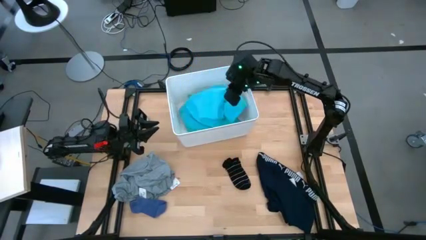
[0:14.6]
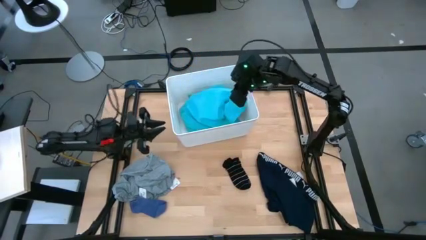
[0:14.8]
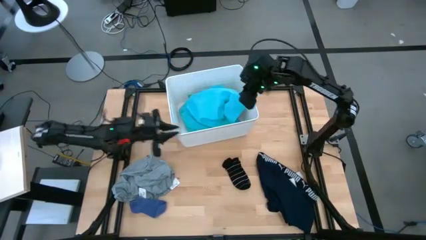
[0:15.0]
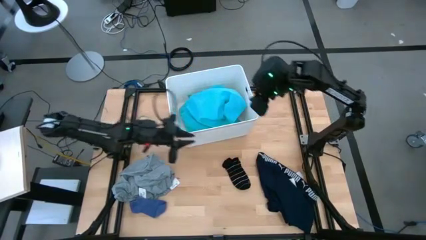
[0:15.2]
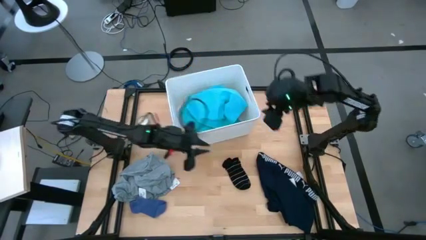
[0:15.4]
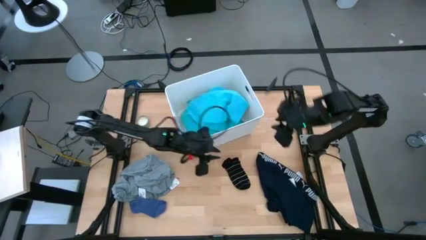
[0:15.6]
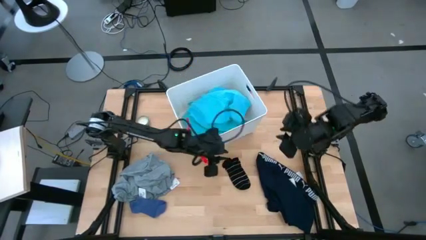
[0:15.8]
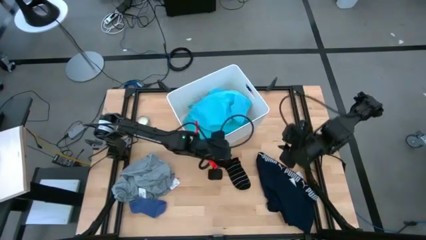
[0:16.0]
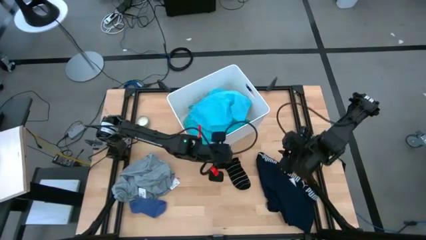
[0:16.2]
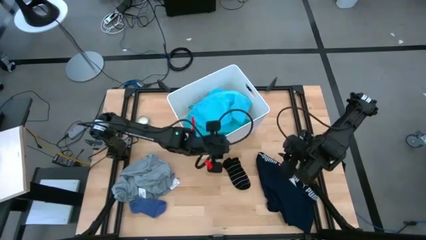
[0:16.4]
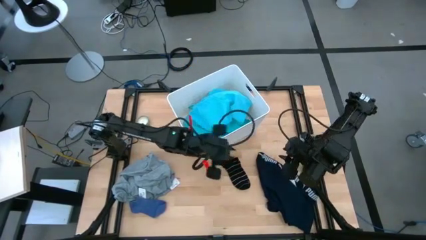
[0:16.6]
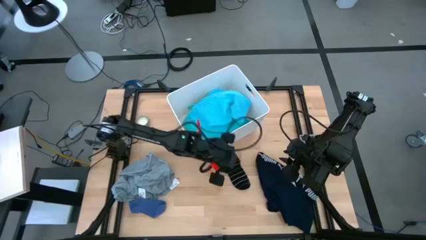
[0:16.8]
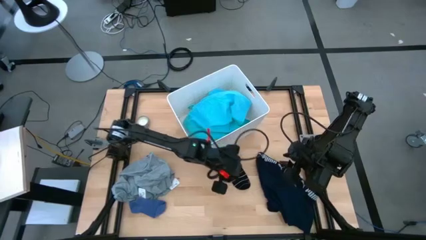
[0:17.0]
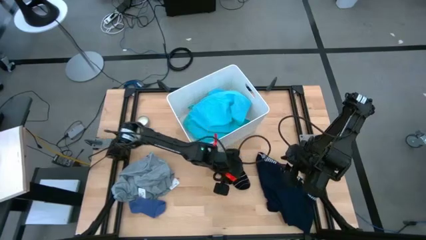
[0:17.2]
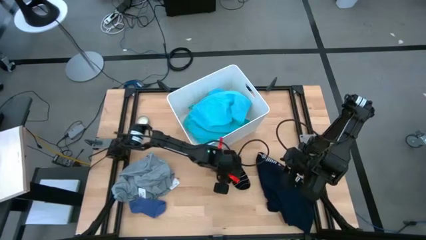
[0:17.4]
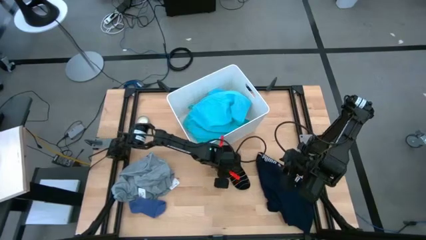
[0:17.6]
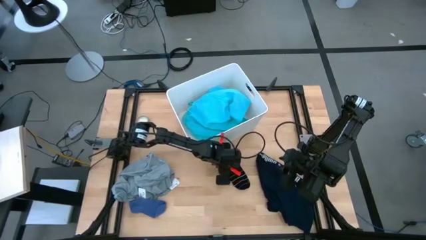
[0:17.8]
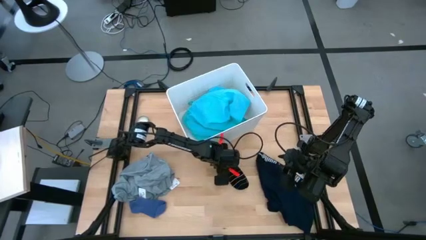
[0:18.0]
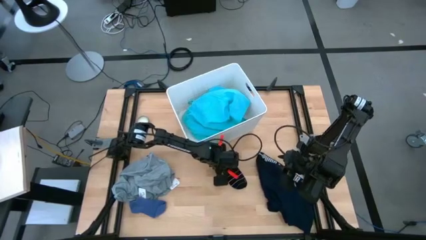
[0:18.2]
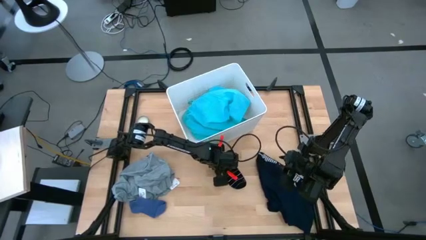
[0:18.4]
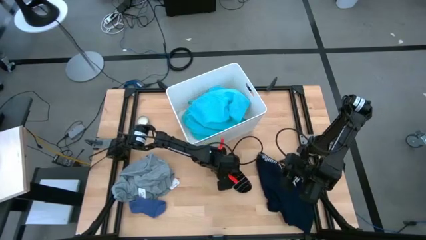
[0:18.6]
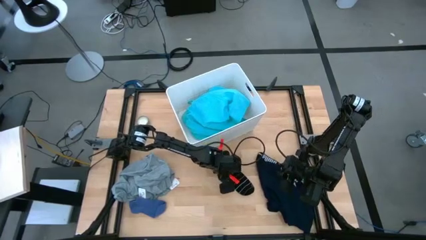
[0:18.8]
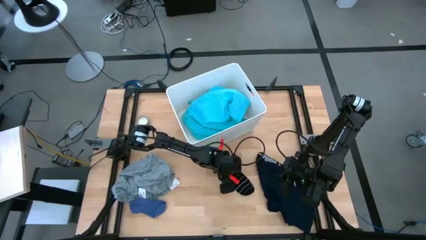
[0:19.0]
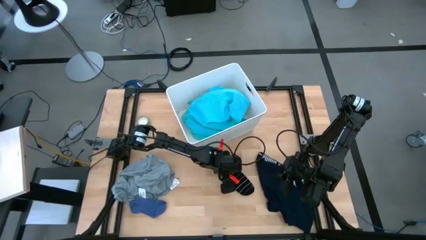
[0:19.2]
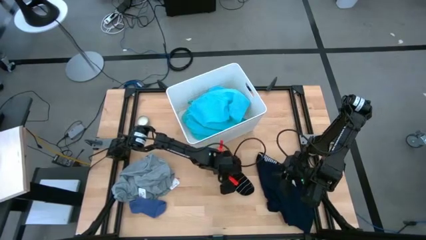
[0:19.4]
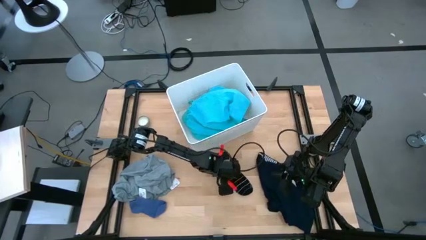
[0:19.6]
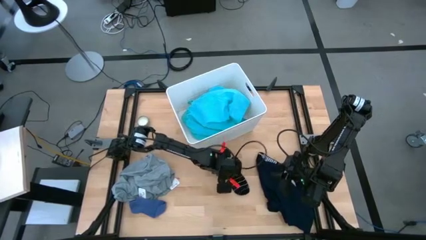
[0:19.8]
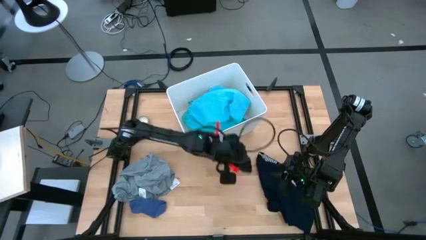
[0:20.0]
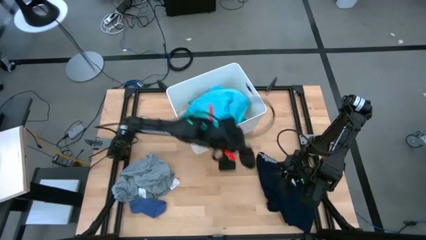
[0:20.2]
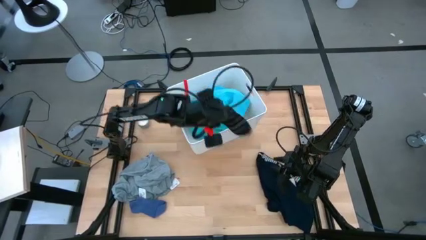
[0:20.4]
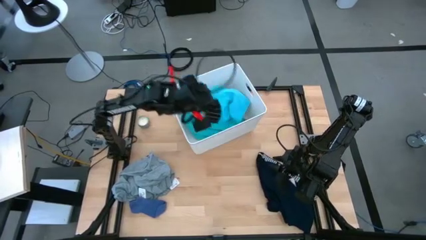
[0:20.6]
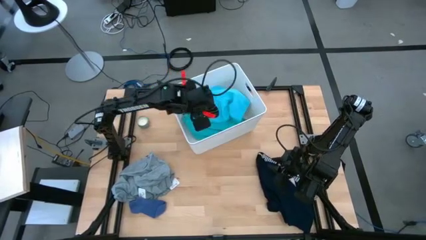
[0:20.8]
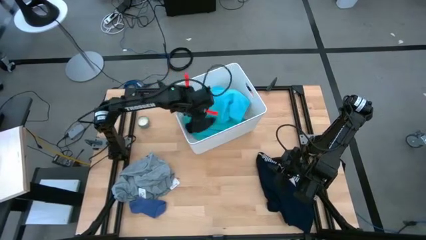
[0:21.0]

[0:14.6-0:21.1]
Task: Sort clothes
Put the black sock into the white laundry bin

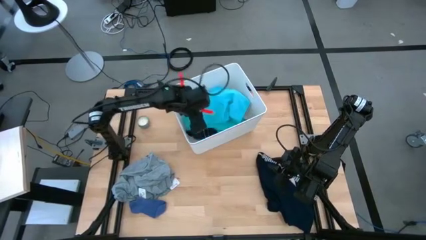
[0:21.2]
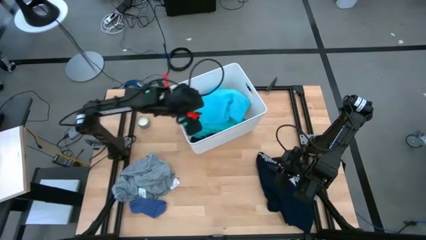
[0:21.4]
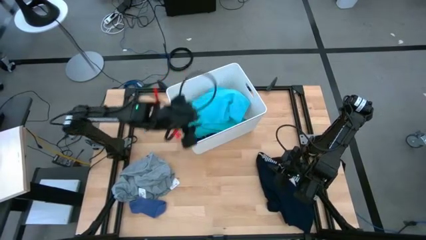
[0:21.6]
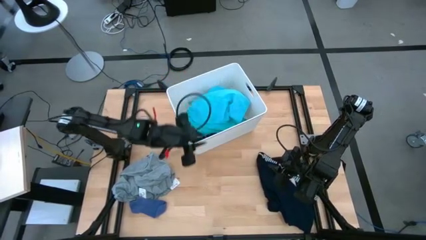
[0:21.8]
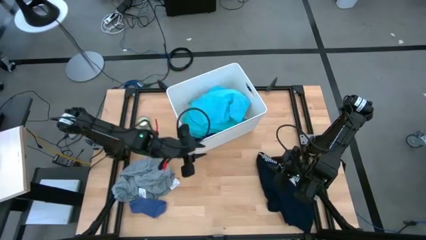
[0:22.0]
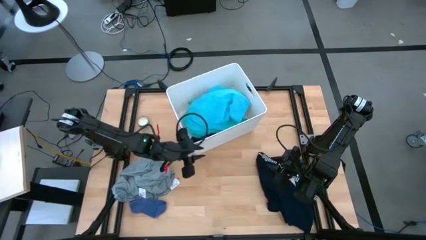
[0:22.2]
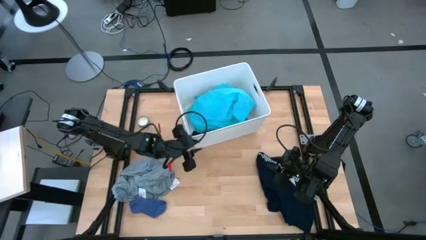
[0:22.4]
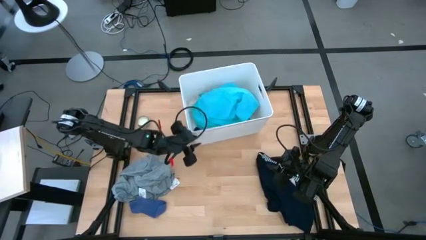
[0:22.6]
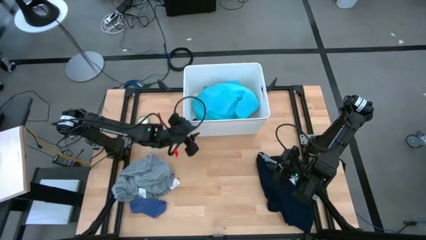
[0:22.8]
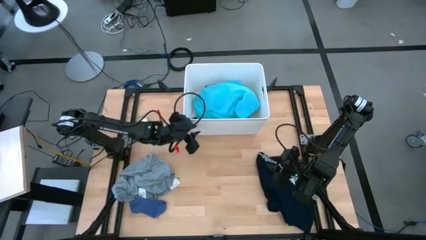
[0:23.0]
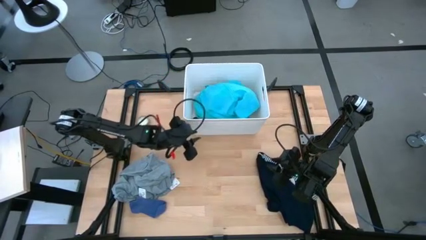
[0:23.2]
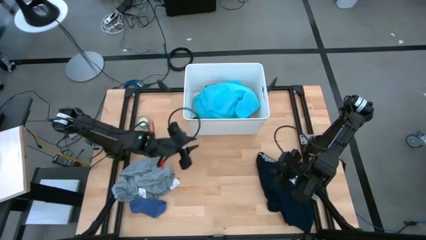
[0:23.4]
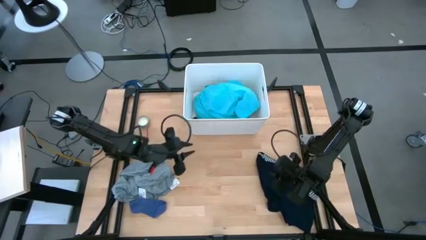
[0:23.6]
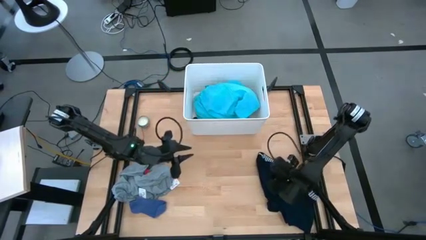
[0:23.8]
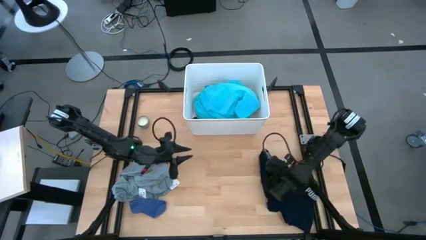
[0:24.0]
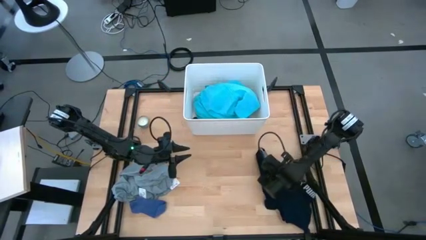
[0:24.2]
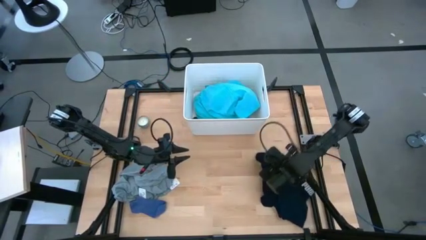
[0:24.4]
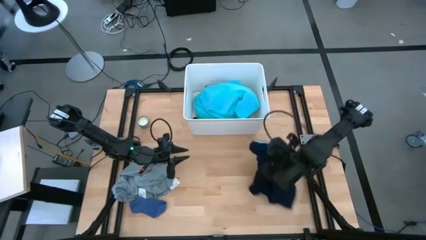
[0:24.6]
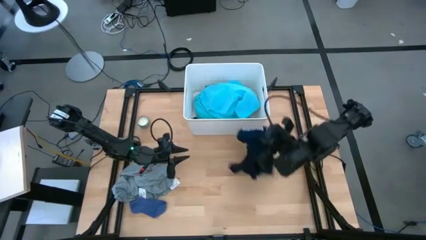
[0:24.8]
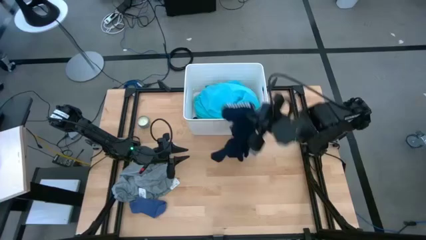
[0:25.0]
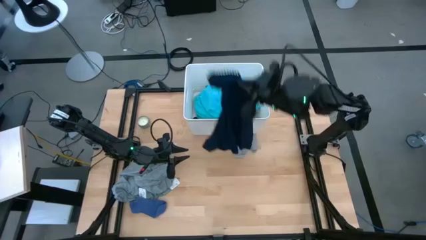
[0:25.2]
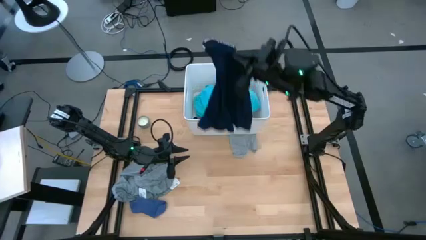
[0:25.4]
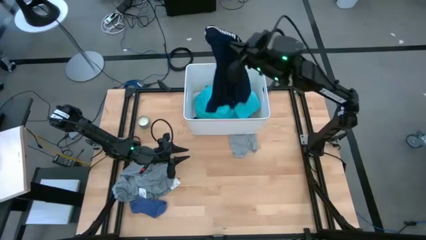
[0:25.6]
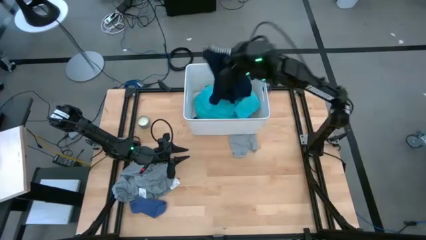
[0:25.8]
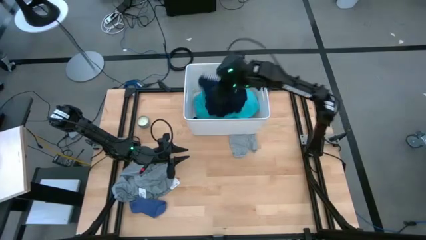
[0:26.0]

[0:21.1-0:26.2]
Put the black boxer short into the white laundry bin

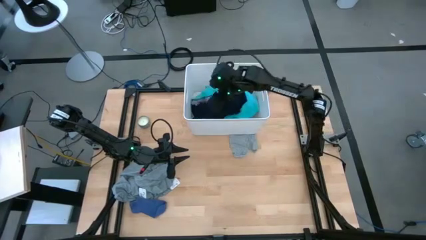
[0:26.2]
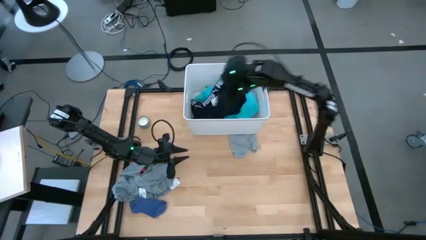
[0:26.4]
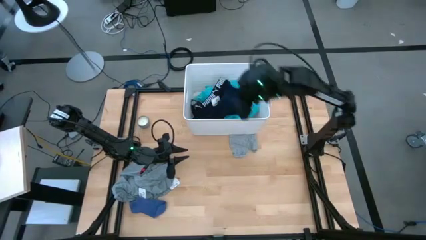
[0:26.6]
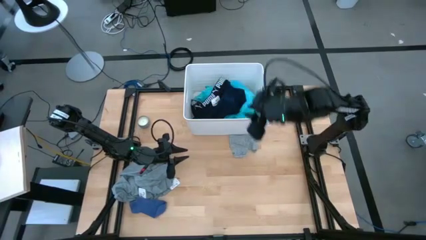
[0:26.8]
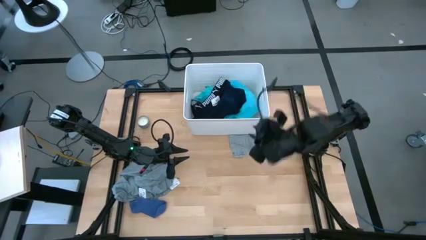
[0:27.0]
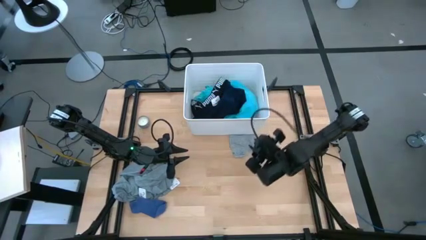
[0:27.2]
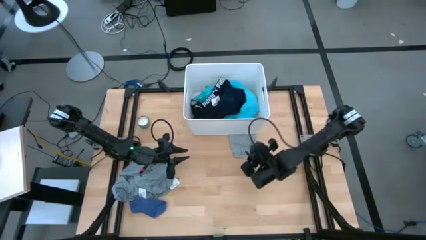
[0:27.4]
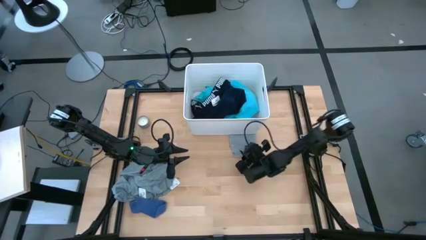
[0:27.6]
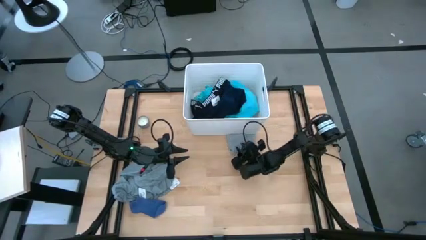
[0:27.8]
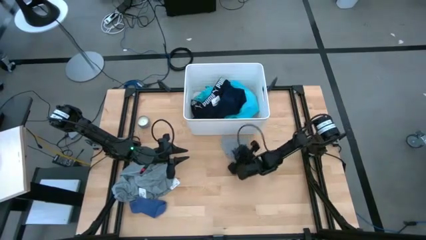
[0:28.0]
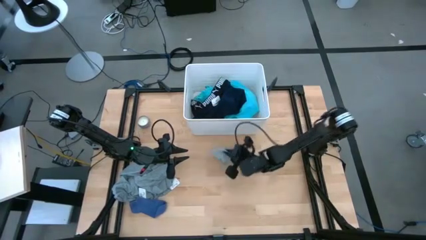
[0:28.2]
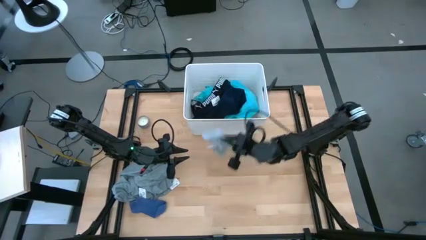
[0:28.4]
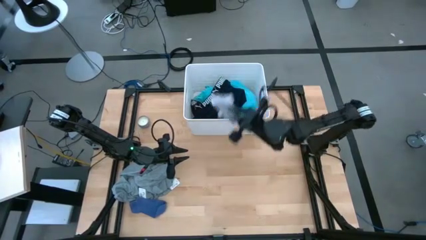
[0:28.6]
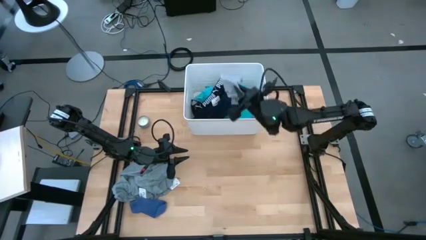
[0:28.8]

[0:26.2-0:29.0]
Put the gray sock into the white laundry bin

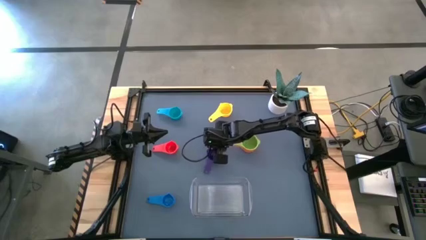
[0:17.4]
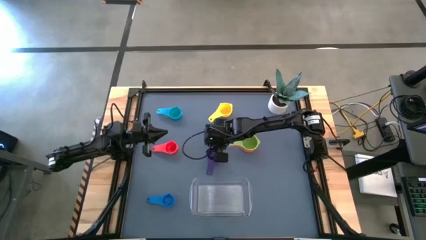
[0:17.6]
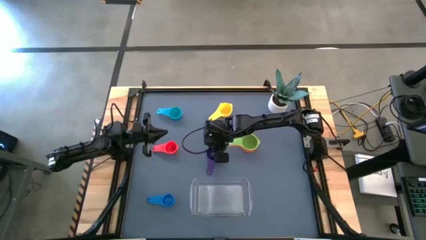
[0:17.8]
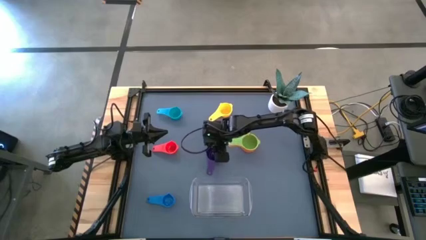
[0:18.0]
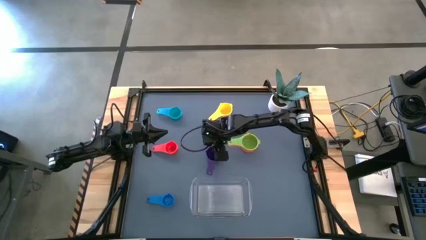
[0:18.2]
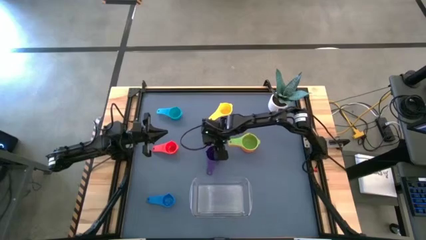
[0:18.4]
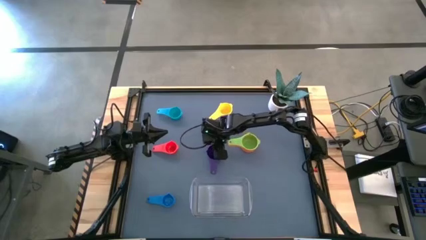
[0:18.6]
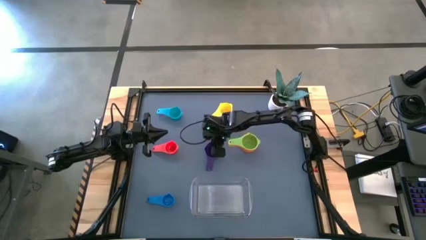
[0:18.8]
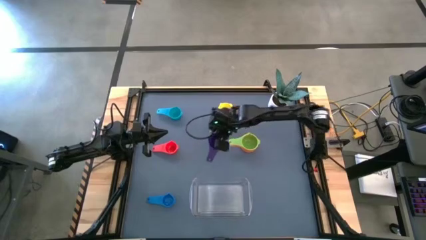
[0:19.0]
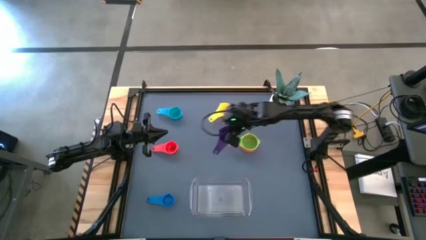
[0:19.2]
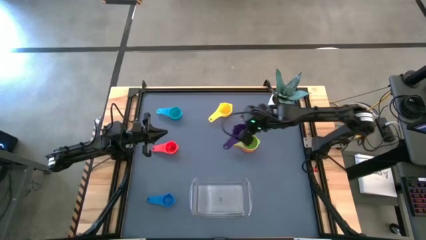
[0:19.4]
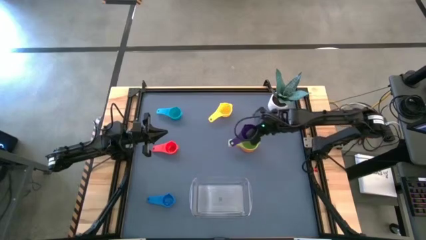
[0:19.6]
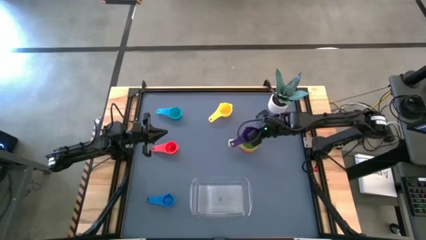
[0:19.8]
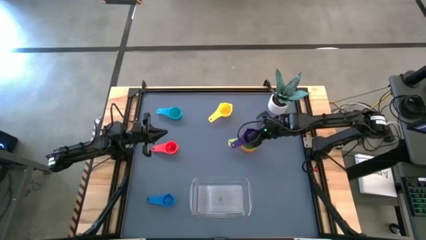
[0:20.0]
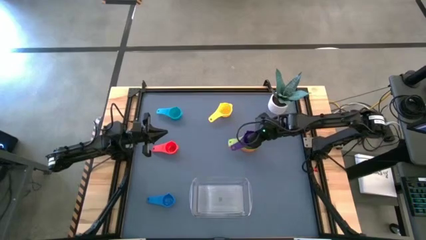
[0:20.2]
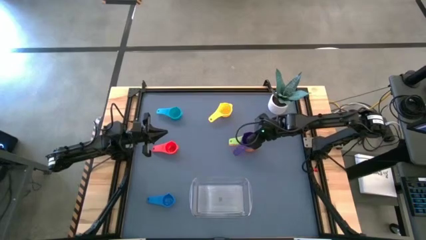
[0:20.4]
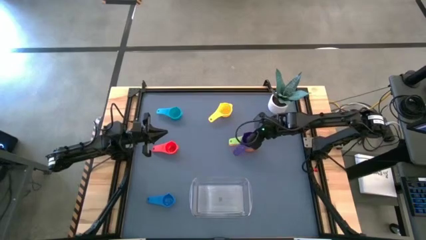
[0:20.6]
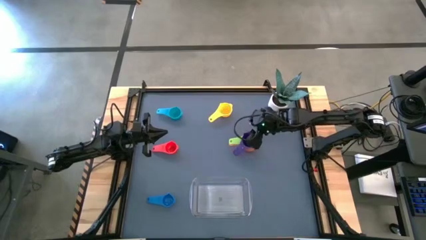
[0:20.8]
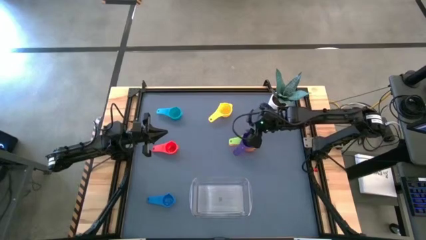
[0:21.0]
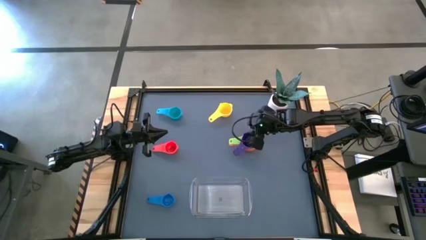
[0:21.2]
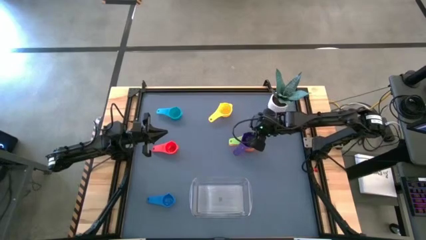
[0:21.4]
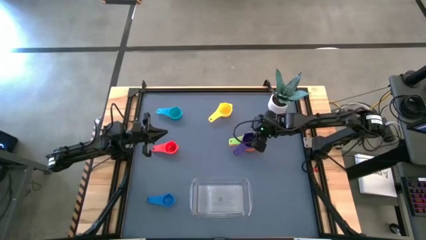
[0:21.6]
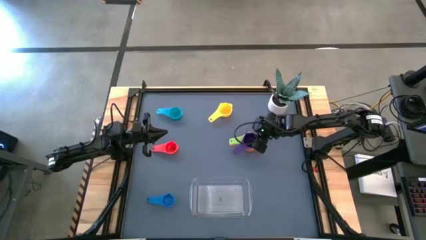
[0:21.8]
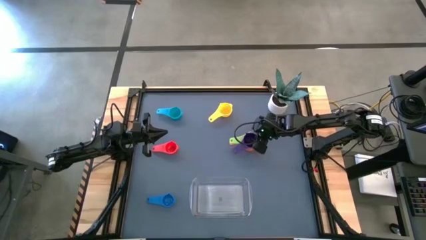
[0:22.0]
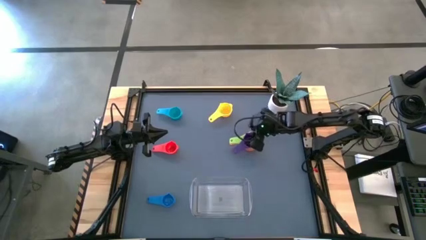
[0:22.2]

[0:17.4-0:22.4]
Task: Nest measuring cups in basket
Stack the violet measuring cup on top of the green measuring cup
